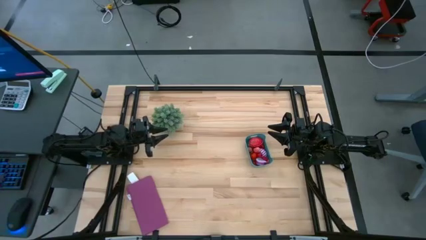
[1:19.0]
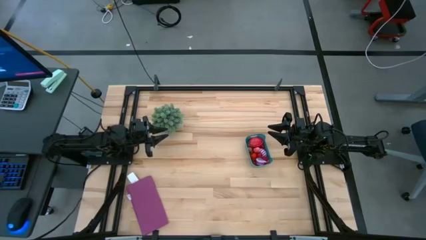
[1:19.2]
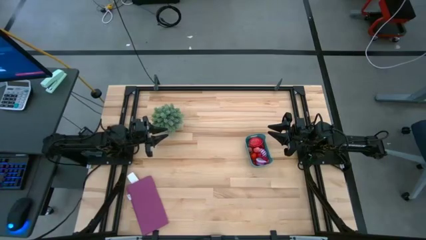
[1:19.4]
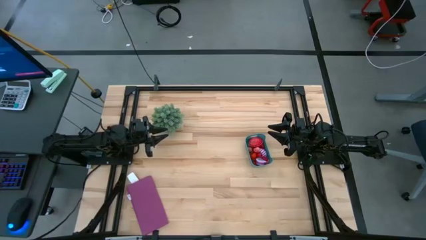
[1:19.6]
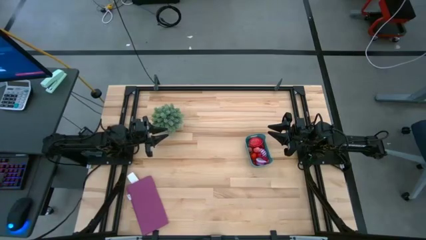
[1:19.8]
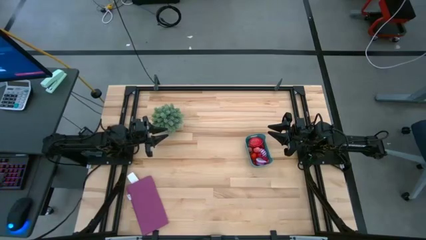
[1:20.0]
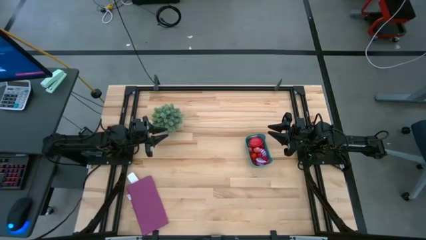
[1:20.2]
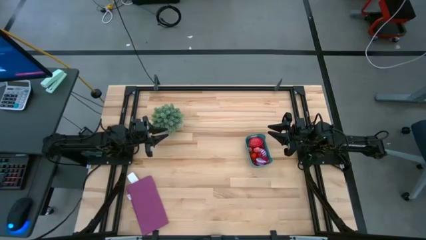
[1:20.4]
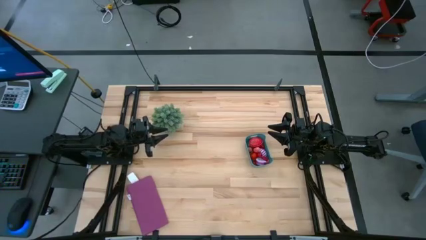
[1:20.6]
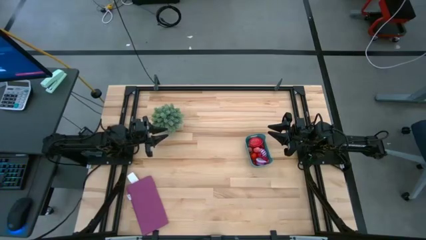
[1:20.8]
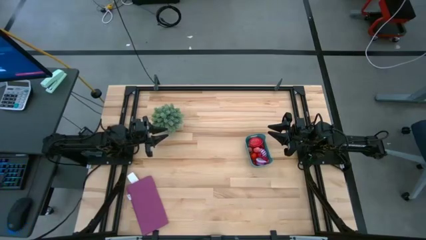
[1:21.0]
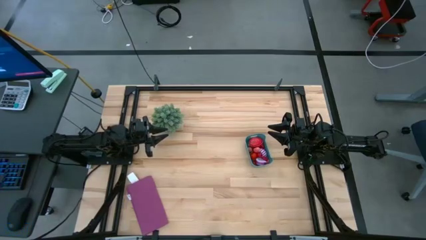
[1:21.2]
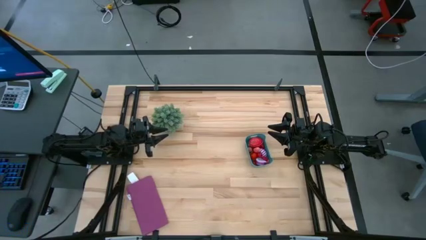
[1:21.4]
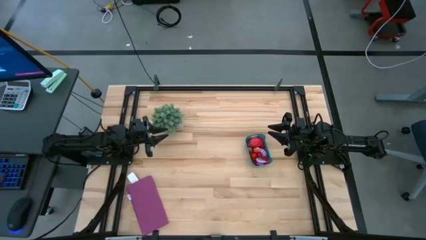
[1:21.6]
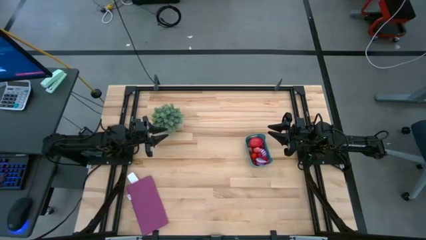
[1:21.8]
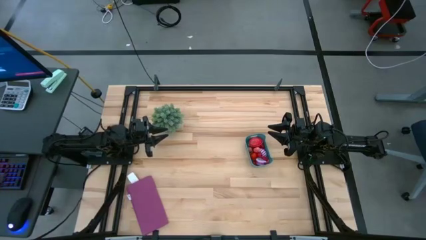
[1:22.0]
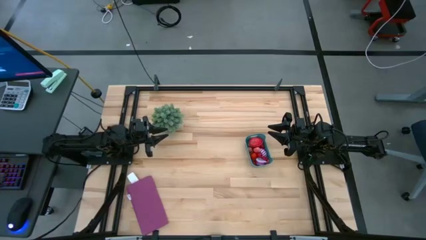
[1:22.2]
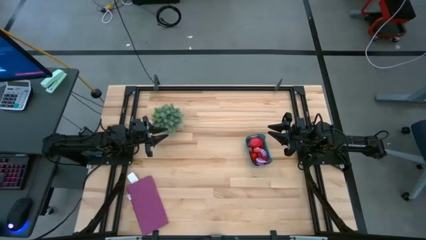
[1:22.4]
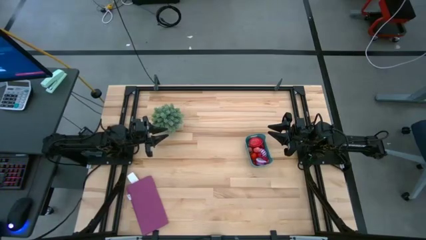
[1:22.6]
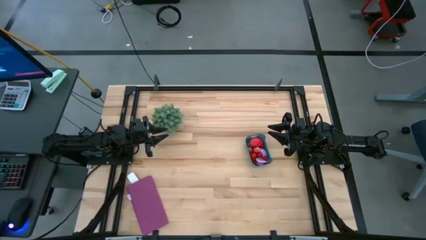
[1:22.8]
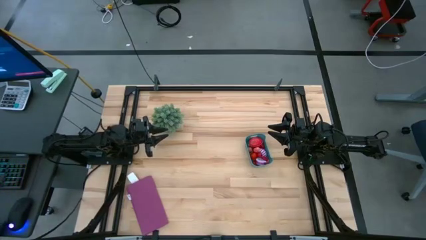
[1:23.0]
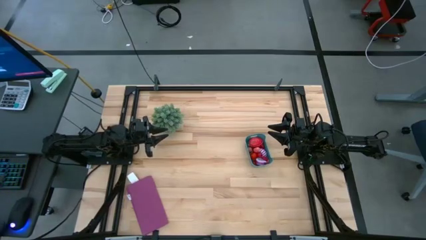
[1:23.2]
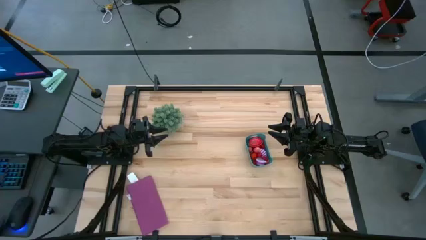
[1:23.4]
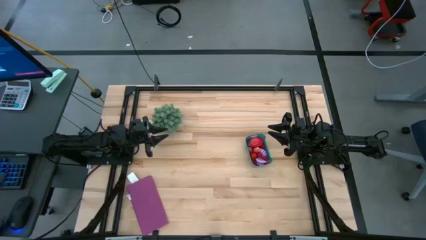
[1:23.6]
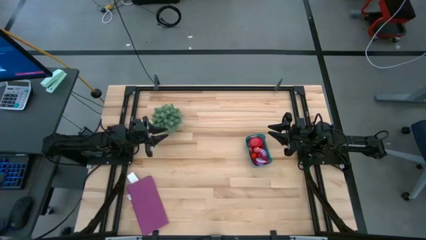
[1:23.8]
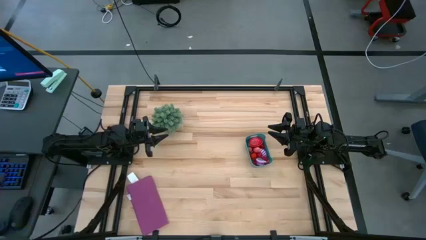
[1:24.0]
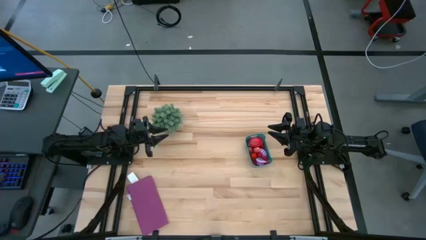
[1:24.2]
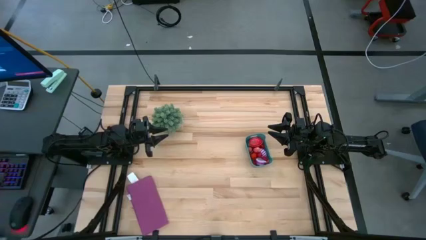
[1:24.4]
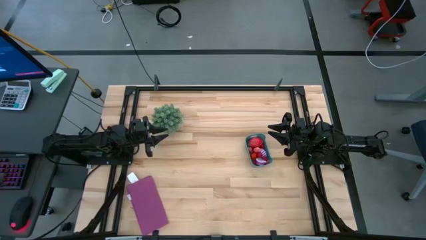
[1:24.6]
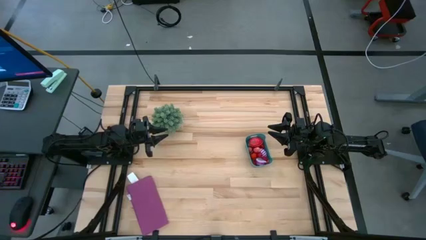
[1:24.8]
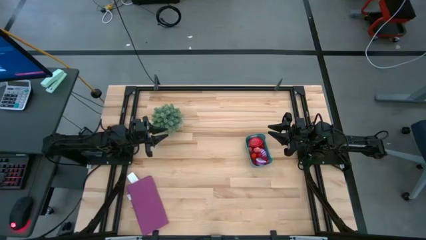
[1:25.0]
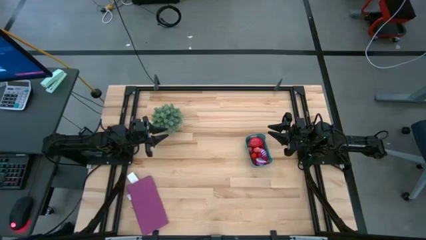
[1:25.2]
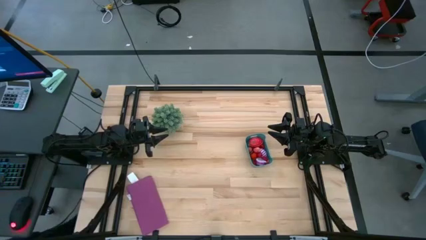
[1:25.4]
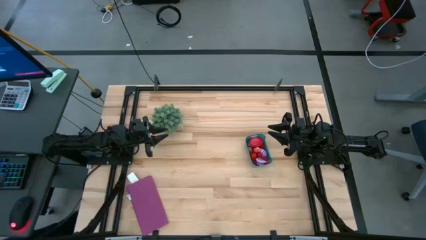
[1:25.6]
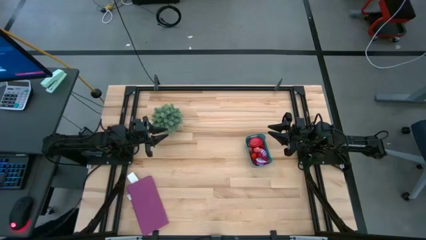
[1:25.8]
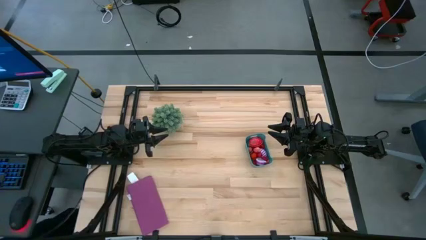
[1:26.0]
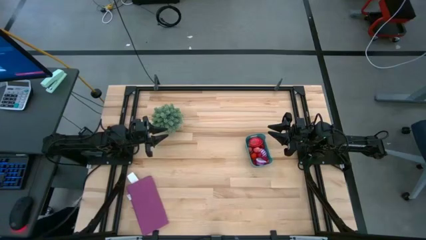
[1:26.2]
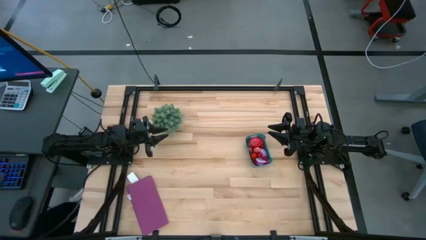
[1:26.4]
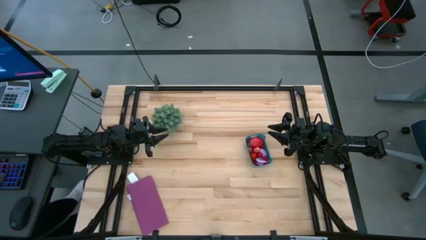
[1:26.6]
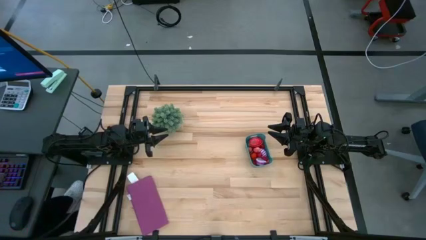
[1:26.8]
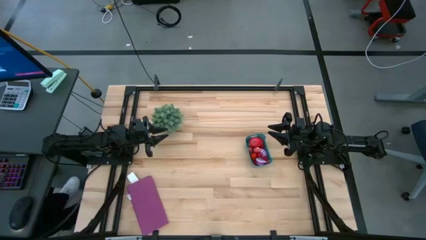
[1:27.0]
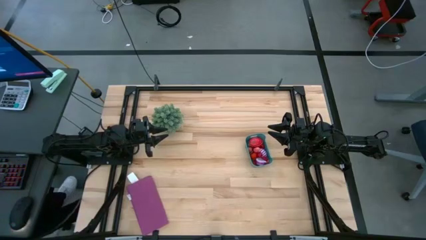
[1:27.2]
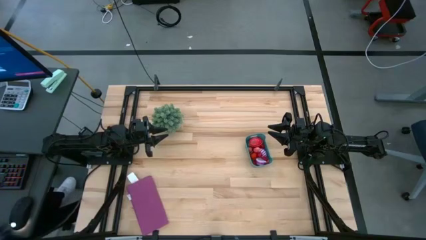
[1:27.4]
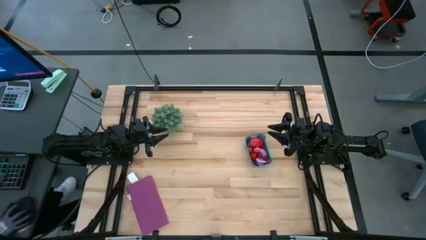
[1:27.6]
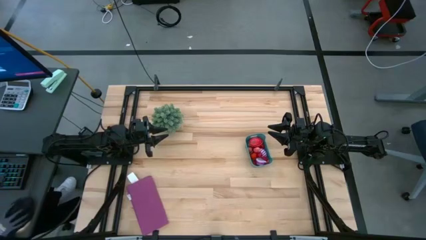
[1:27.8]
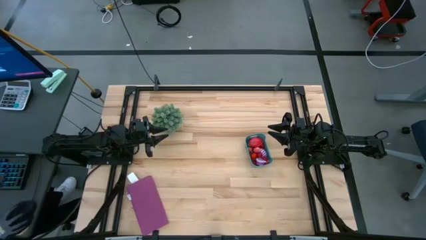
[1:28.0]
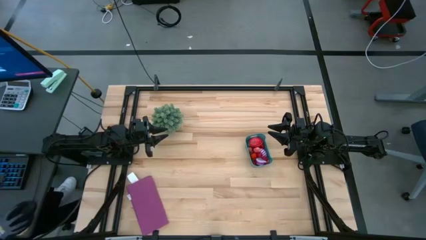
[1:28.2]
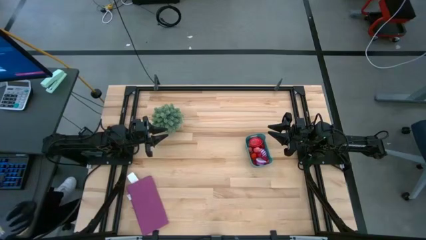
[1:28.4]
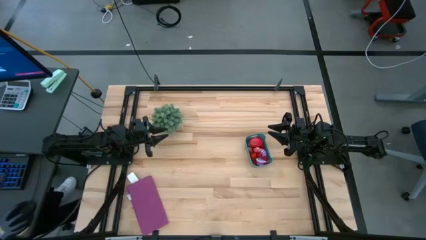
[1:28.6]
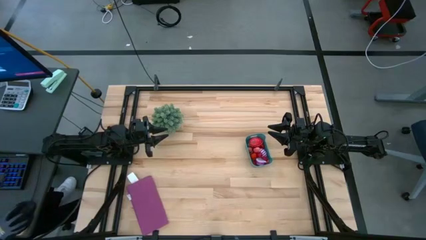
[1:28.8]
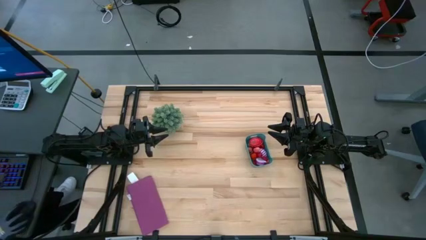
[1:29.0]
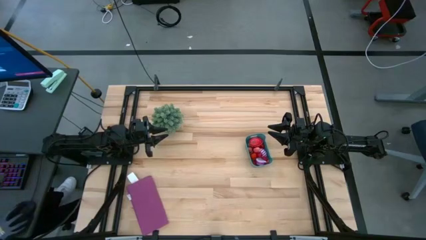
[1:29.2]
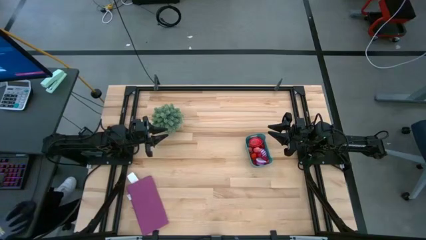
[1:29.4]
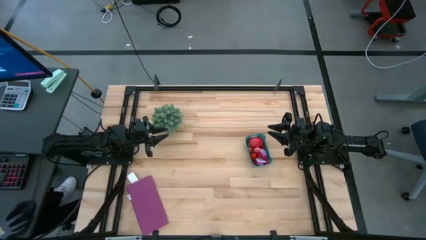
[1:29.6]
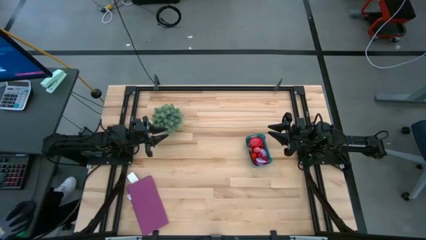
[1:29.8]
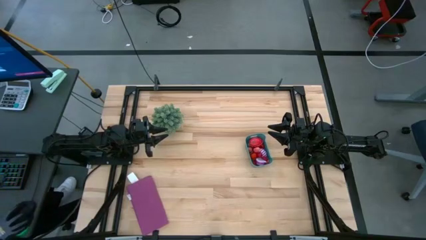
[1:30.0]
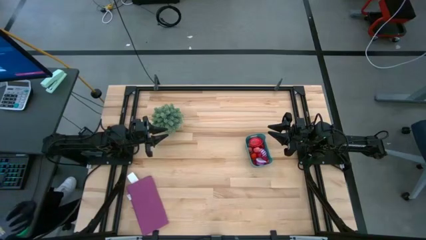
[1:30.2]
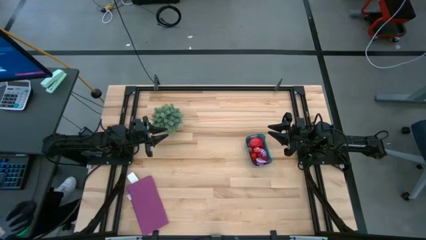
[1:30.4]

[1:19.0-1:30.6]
Task: Pick and placing Produce into tupperware
Return to Home Position
